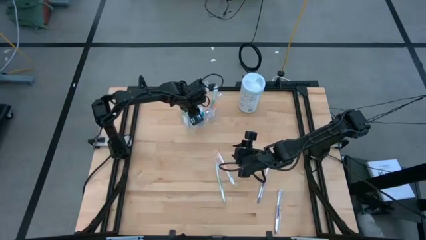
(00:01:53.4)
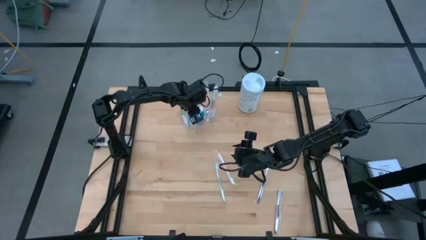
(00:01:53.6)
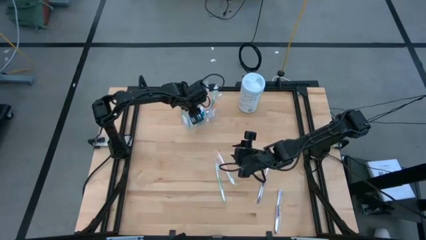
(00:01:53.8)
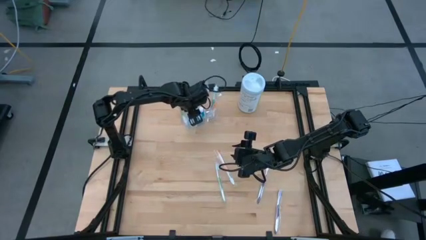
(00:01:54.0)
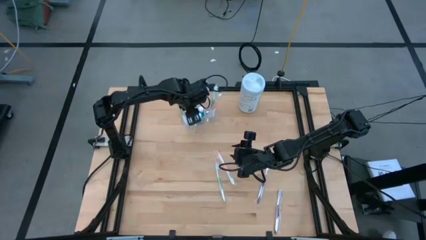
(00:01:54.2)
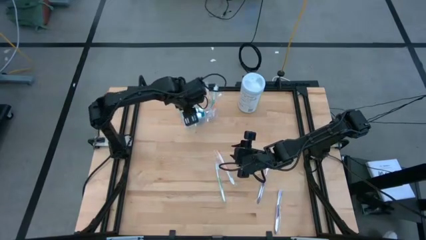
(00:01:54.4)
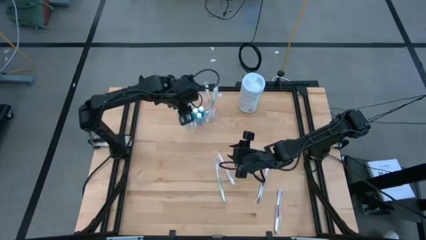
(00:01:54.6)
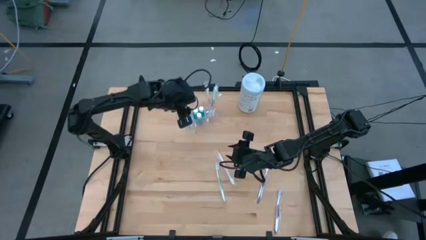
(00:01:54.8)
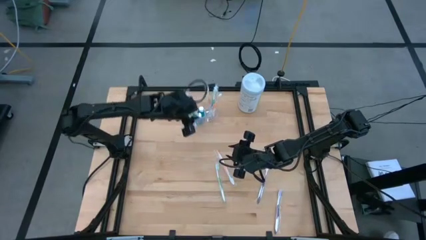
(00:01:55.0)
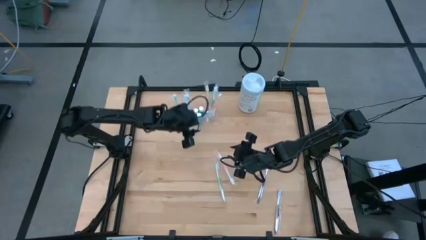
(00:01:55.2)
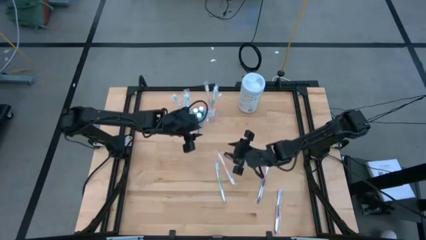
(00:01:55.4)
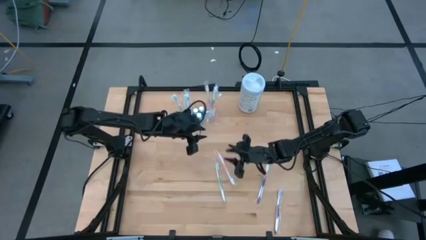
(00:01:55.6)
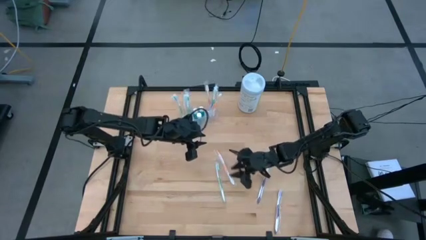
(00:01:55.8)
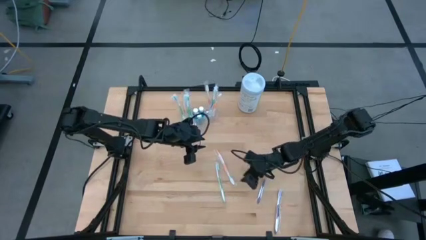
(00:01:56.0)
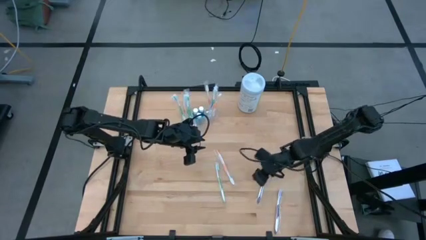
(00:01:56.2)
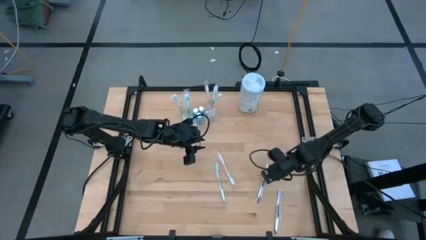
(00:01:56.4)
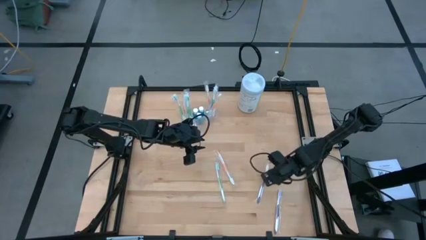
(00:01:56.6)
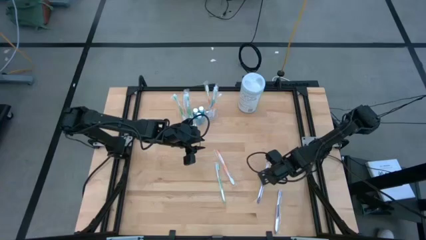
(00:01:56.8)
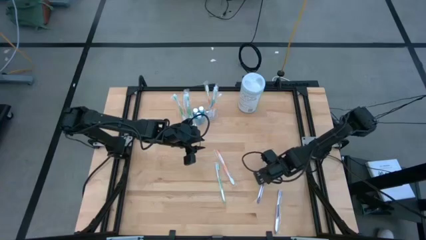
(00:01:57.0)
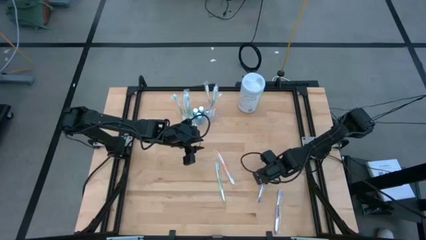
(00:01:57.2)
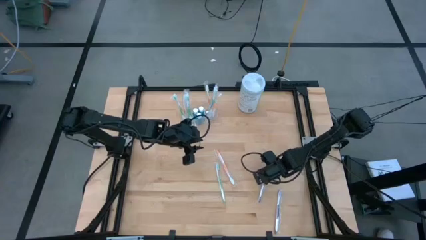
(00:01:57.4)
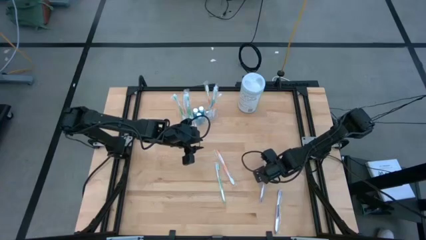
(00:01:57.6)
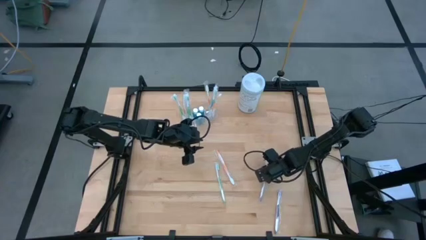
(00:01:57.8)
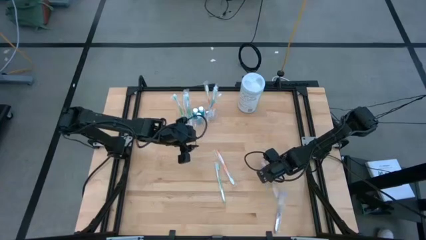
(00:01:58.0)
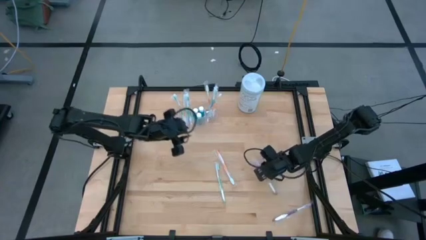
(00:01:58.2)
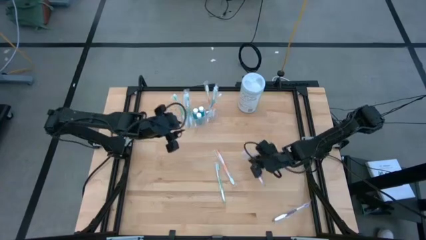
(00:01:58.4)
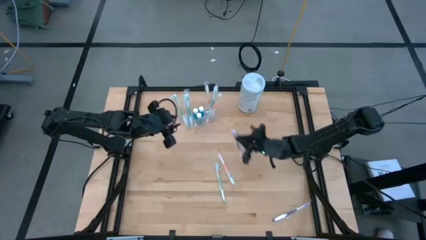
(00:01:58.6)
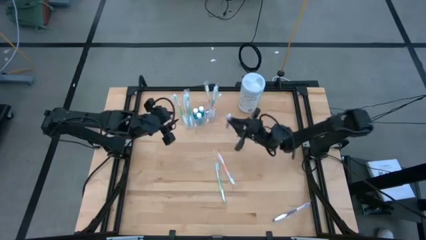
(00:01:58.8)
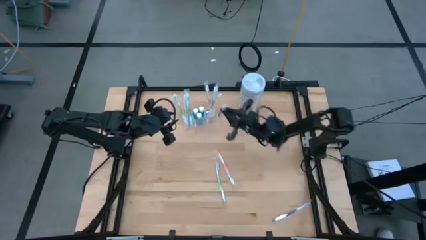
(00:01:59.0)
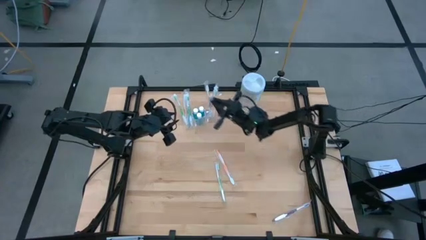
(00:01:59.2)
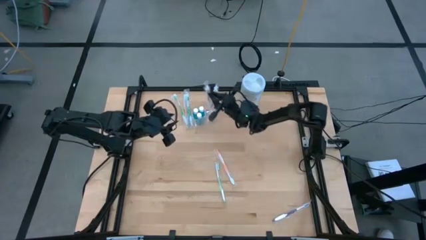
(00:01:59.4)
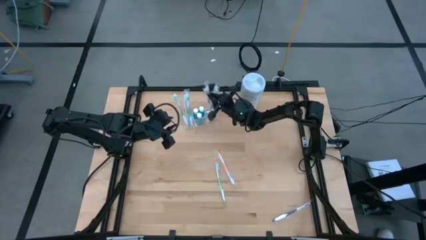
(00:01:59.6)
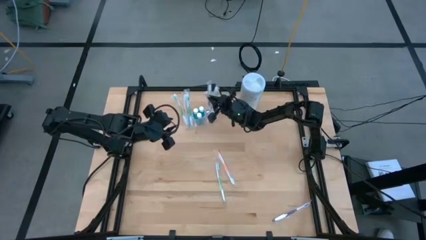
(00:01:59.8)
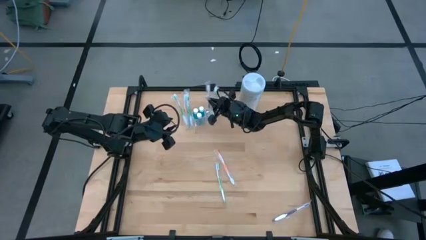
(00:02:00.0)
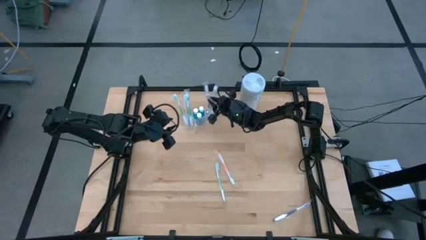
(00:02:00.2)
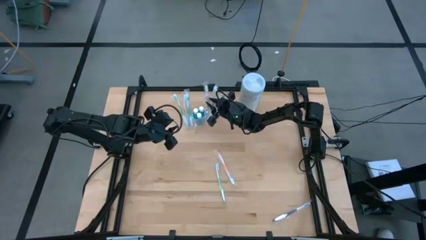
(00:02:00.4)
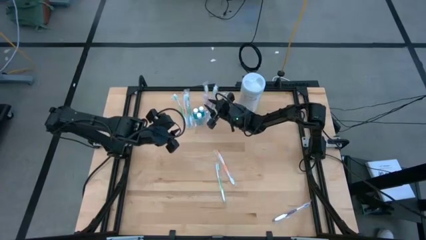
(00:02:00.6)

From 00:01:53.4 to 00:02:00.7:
Task: Pick & Place toothbrushing station
Put the purple toothbrush into the transparent organizer

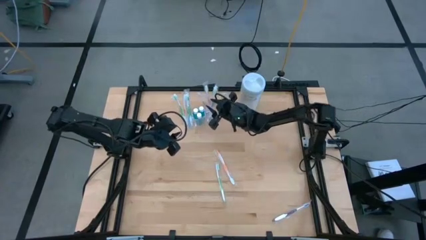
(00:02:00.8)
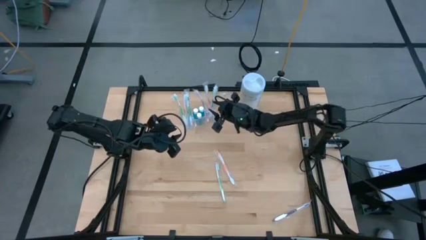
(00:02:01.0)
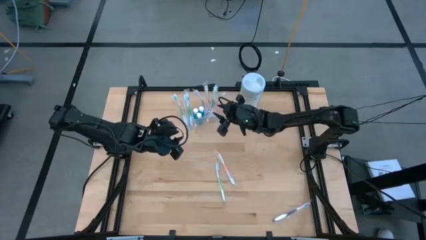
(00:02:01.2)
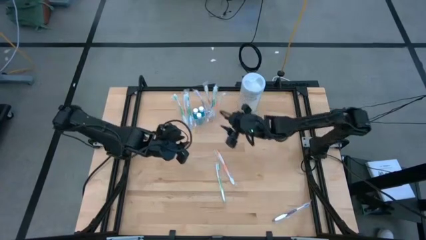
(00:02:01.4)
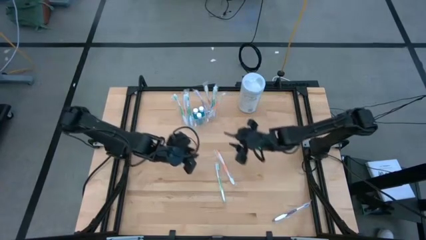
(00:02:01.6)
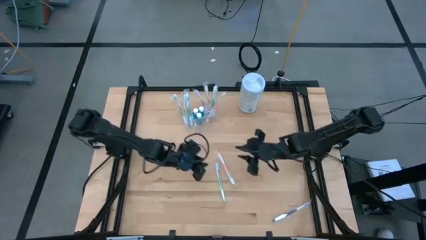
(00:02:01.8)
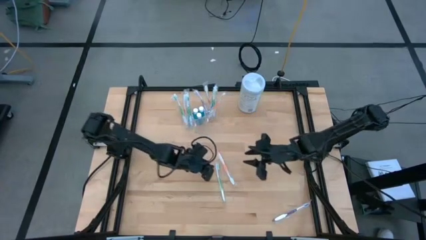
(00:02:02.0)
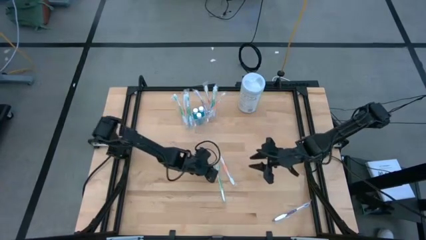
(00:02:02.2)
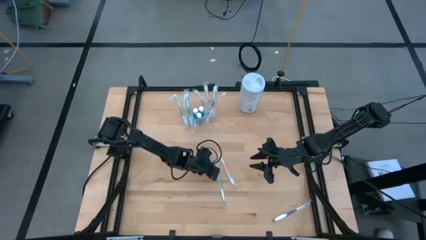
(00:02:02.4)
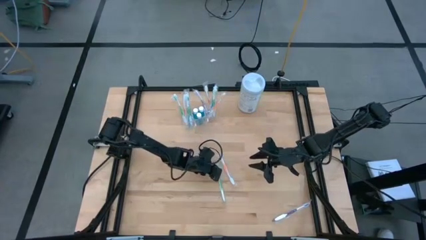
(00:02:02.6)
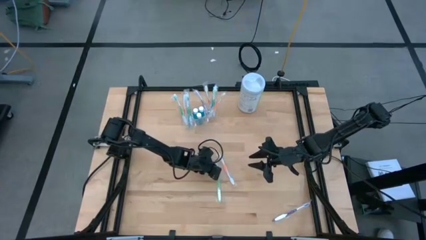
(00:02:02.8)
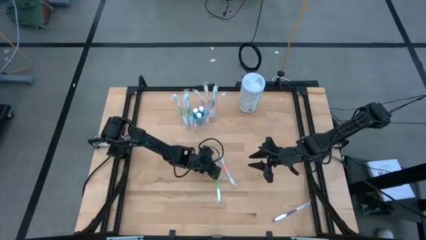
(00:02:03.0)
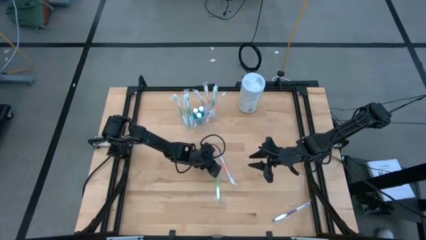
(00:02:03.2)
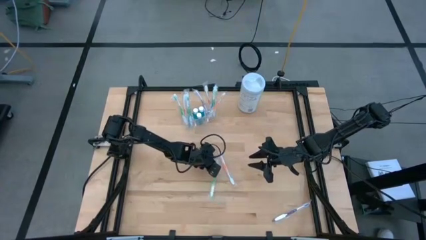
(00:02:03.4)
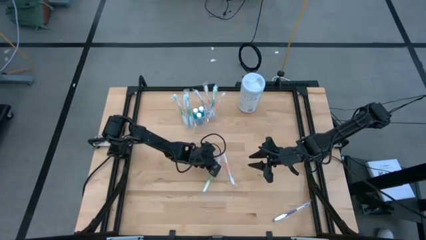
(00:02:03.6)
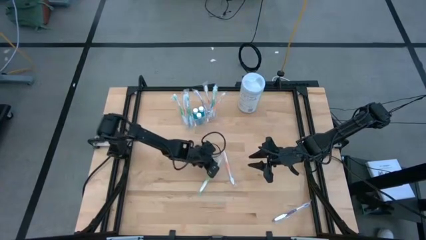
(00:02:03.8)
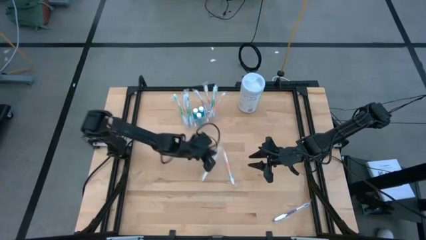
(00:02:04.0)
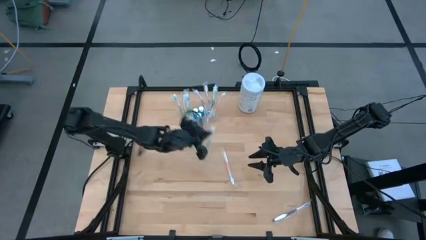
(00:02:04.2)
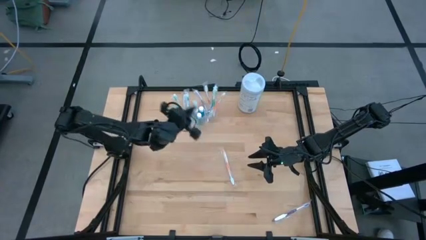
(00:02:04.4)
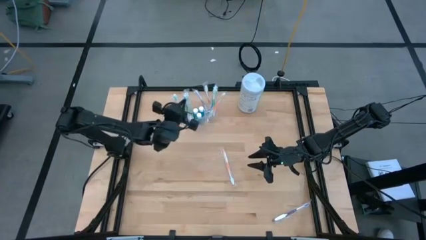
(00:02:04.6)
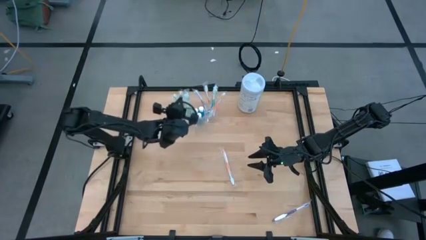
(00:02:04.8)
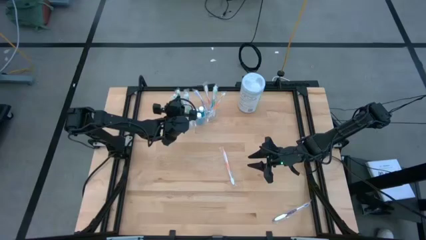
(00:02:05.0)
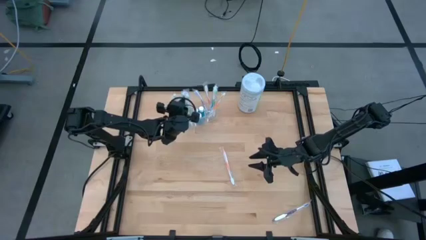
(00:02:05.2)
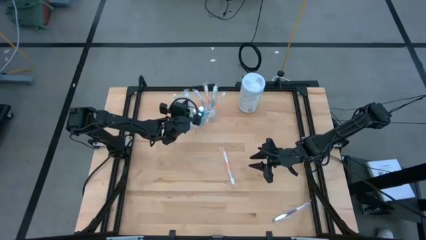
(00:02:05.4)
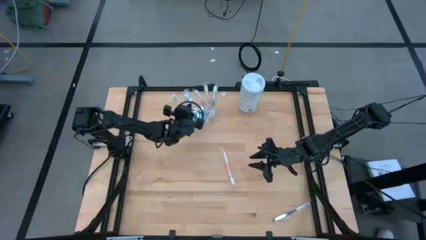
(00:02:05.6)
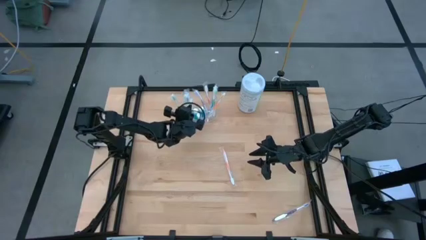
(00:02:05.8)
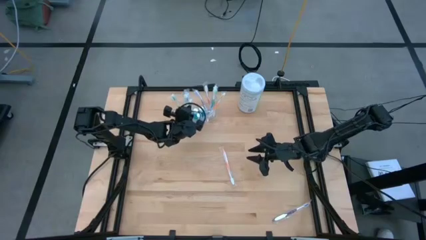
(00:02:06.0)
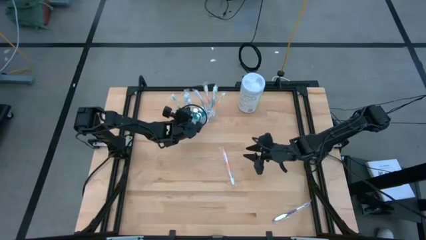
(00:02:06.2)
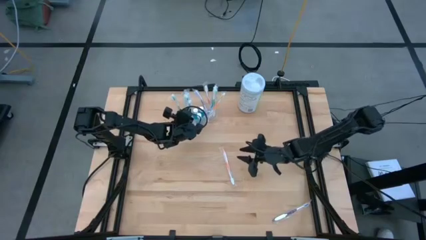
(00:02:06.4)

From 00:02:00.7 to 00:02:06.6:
Put the green toothbrush into the transparent organizer

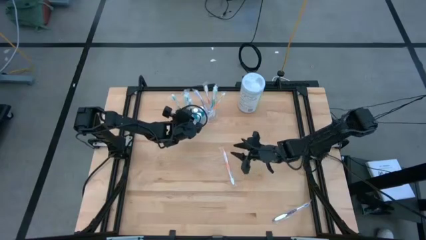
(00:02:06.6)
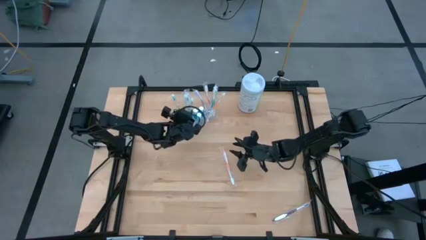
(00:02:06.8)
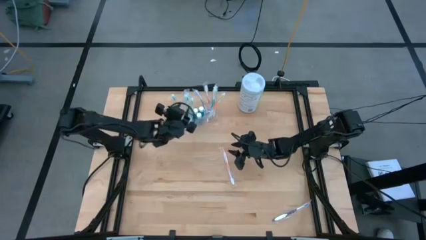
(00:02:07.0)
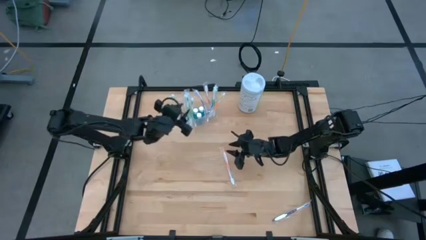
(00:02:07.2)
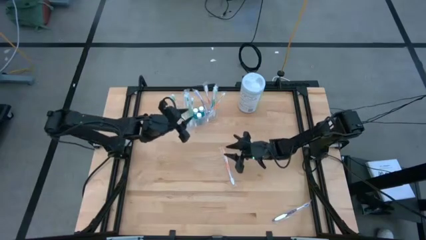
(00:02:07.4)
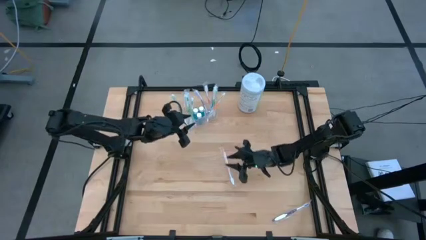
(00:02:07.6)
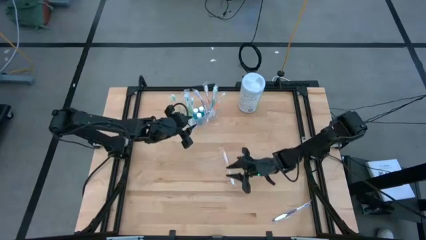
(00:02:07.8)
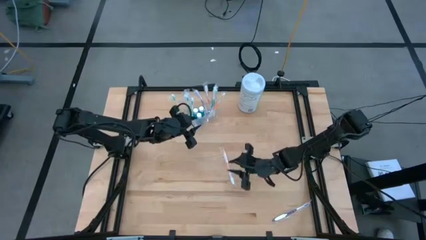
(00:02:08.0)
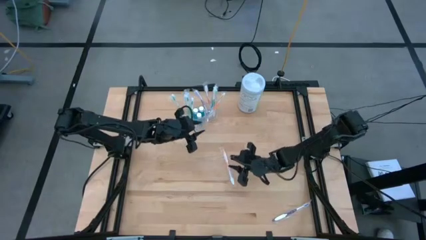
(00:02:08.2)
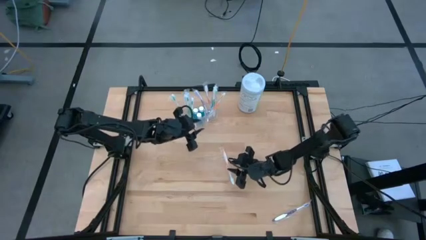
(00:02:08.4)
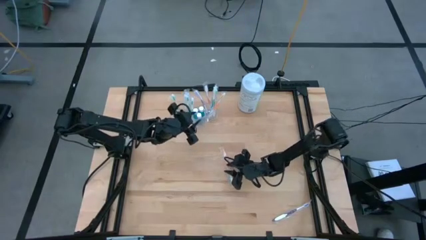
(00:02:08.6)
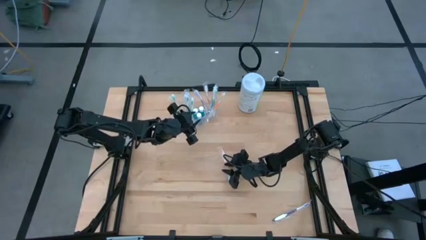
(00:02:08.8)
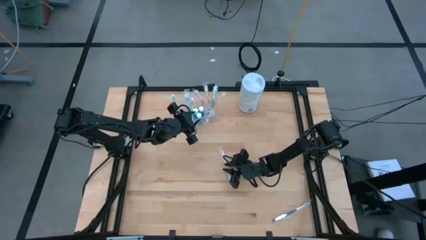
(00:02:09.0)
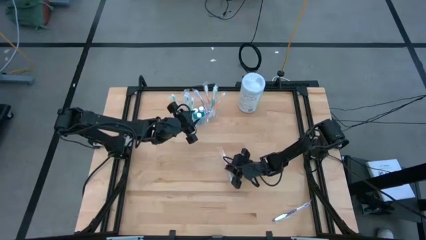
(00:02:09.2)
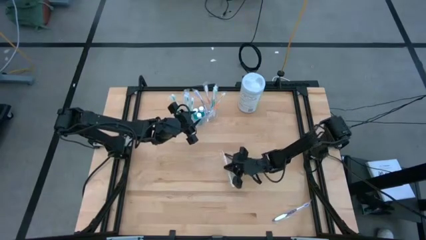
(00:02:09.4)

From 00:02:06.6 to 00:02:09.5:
Put the orange toothbrush into the transparent organizer
